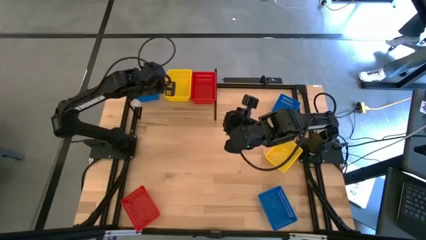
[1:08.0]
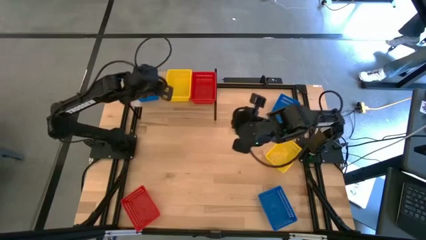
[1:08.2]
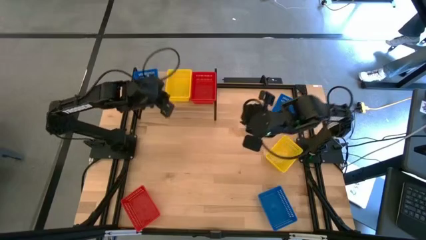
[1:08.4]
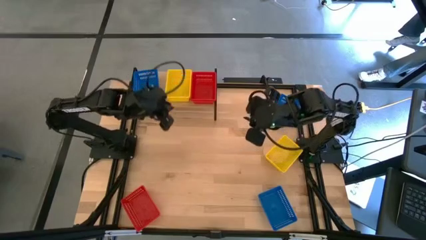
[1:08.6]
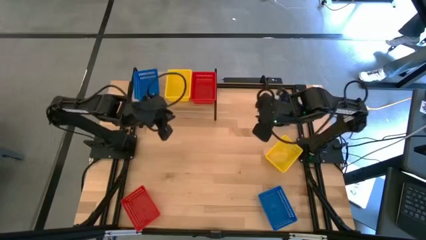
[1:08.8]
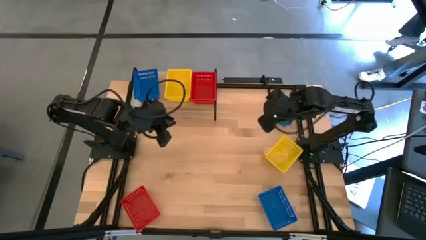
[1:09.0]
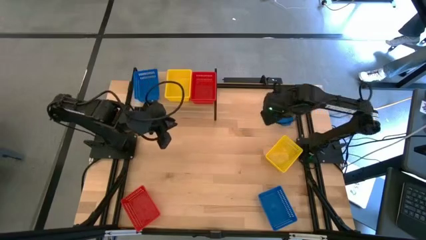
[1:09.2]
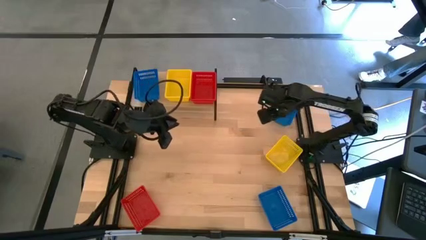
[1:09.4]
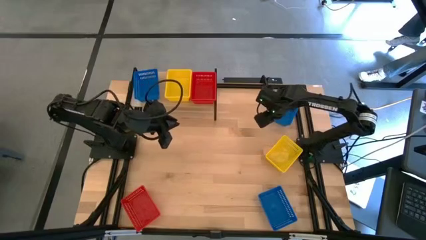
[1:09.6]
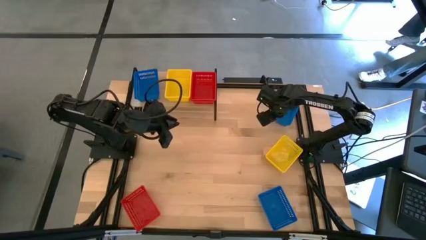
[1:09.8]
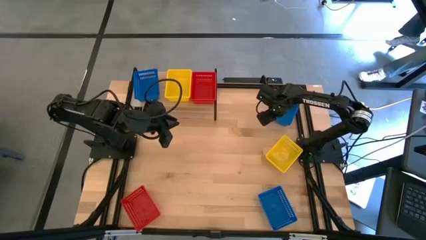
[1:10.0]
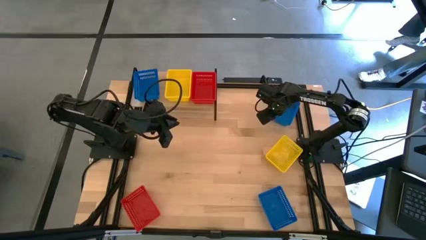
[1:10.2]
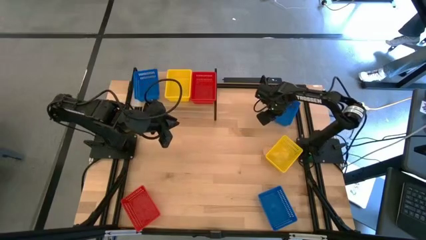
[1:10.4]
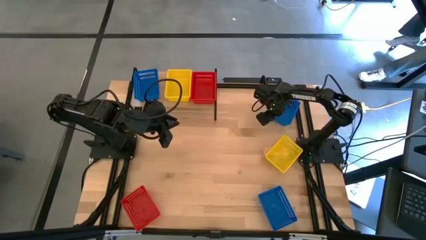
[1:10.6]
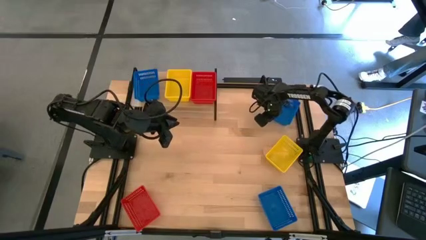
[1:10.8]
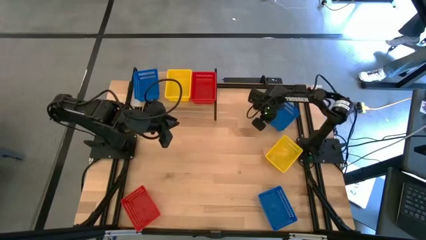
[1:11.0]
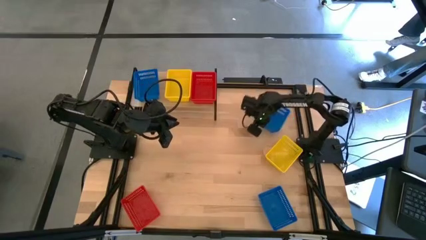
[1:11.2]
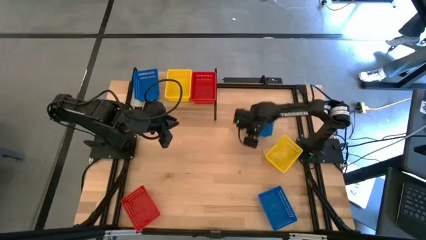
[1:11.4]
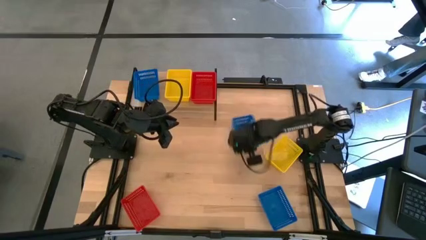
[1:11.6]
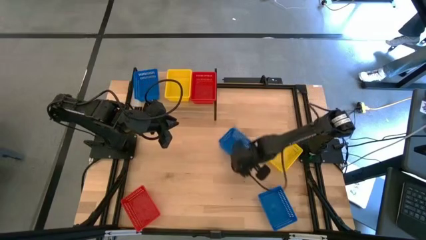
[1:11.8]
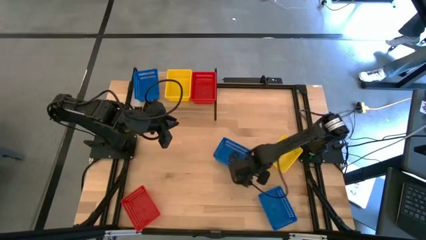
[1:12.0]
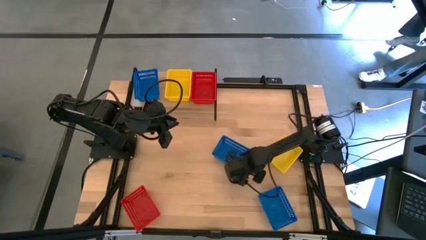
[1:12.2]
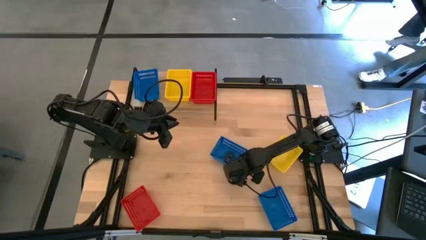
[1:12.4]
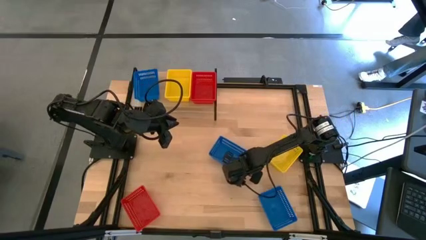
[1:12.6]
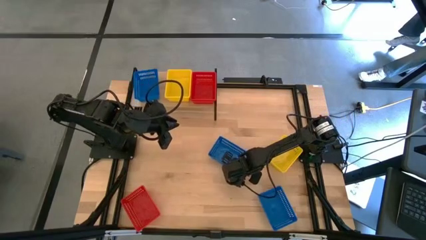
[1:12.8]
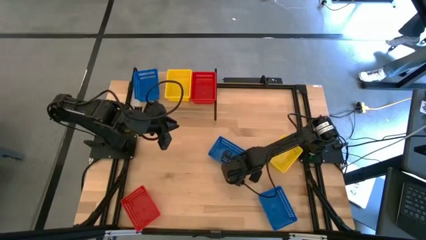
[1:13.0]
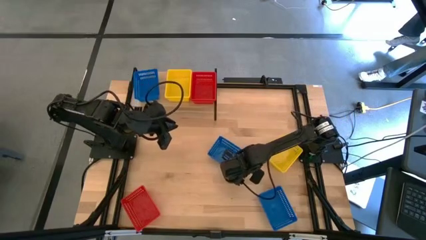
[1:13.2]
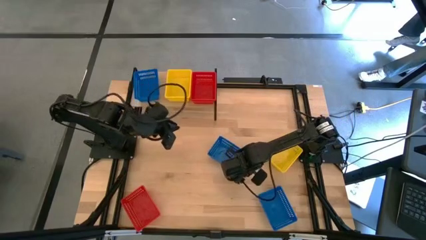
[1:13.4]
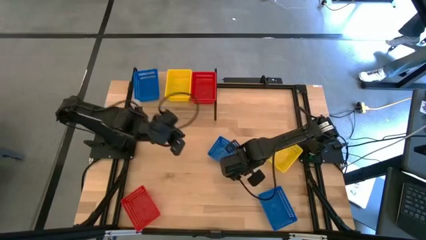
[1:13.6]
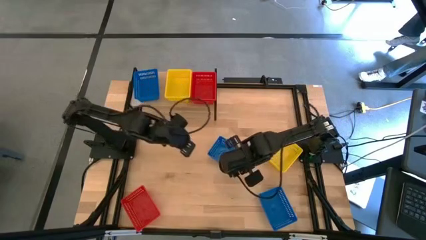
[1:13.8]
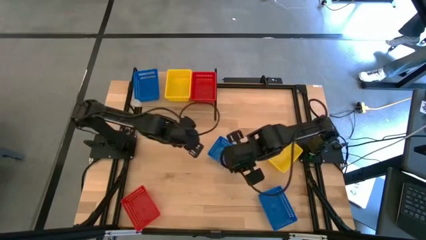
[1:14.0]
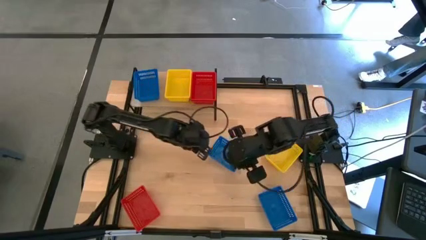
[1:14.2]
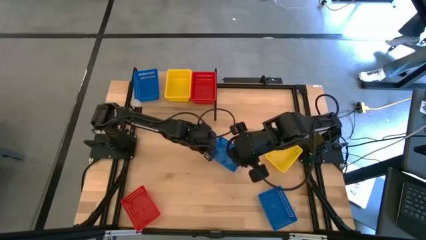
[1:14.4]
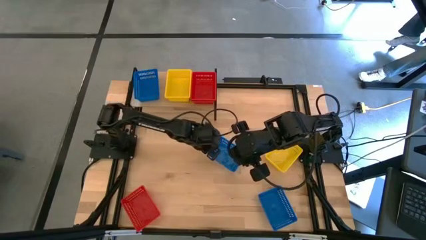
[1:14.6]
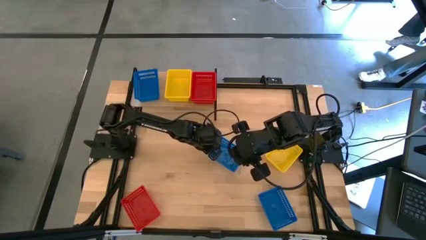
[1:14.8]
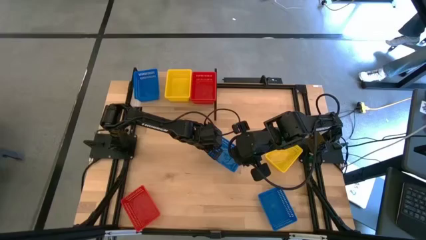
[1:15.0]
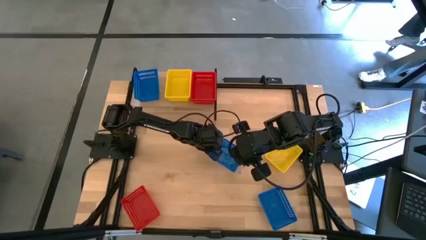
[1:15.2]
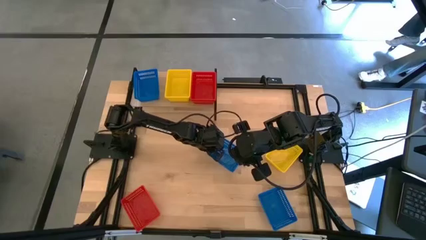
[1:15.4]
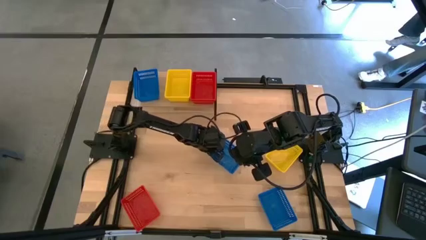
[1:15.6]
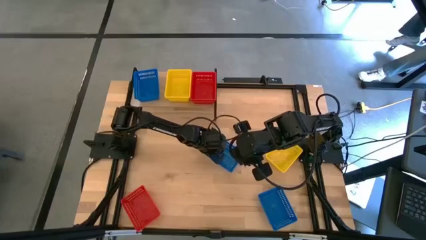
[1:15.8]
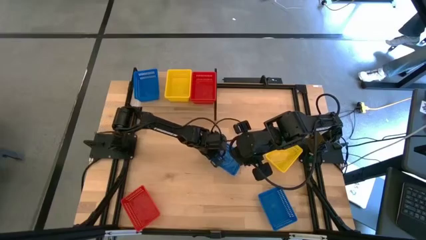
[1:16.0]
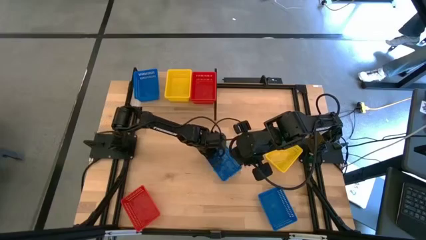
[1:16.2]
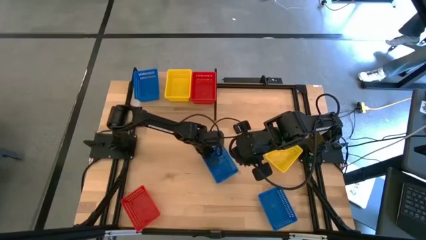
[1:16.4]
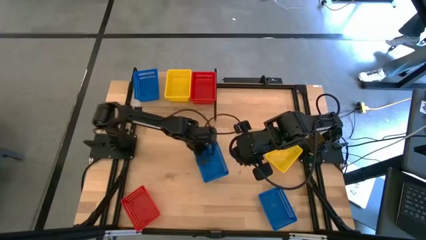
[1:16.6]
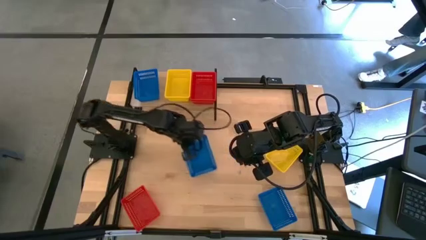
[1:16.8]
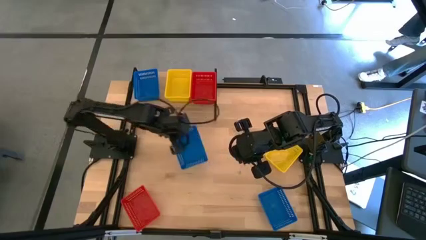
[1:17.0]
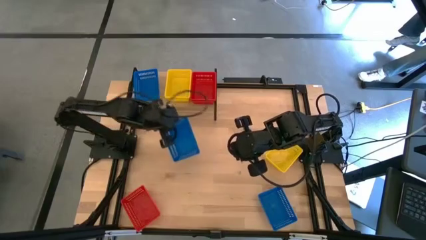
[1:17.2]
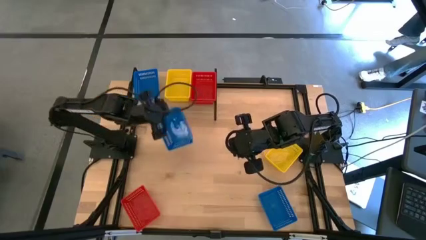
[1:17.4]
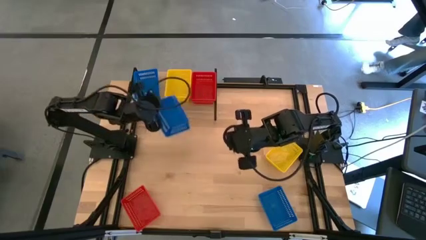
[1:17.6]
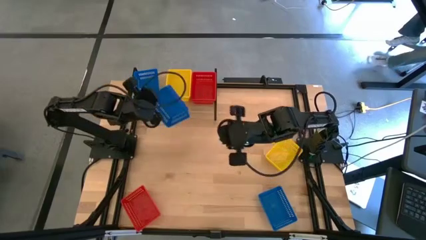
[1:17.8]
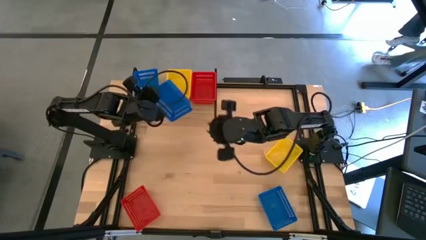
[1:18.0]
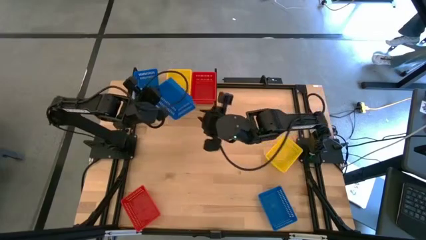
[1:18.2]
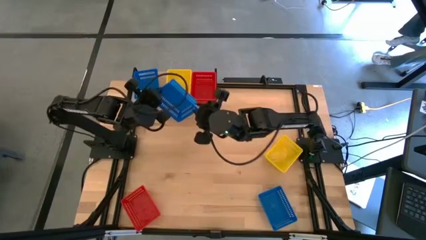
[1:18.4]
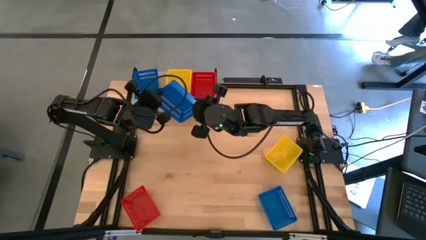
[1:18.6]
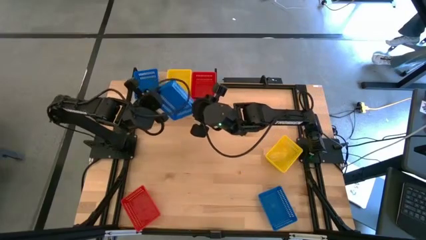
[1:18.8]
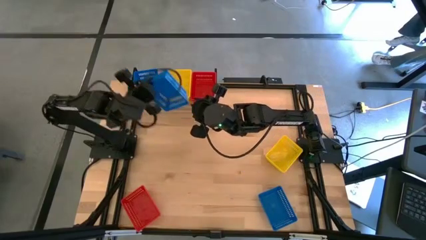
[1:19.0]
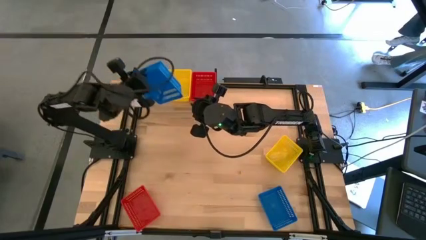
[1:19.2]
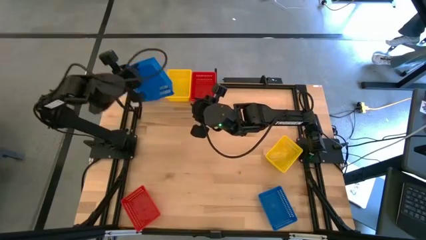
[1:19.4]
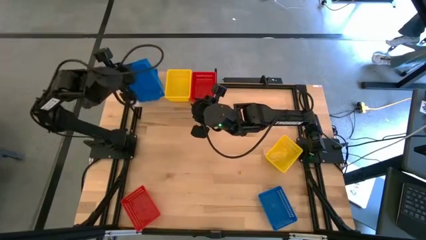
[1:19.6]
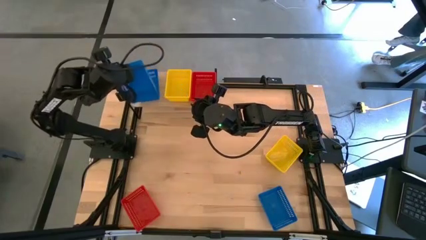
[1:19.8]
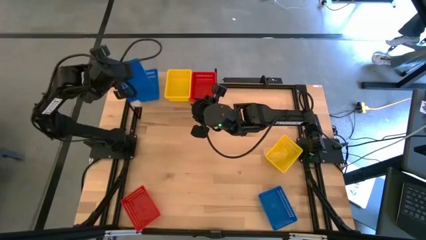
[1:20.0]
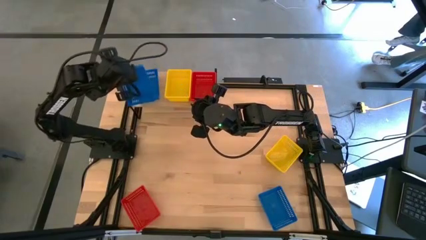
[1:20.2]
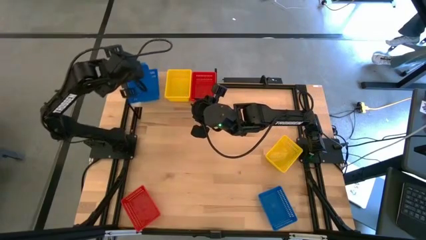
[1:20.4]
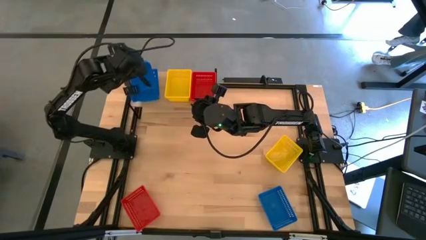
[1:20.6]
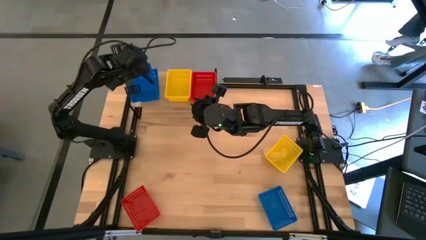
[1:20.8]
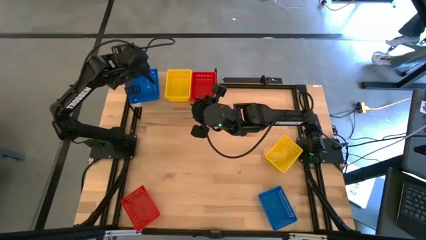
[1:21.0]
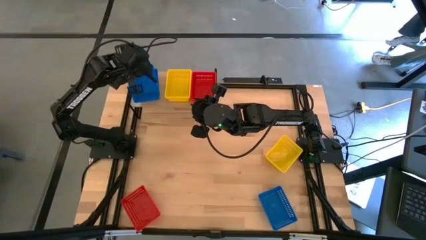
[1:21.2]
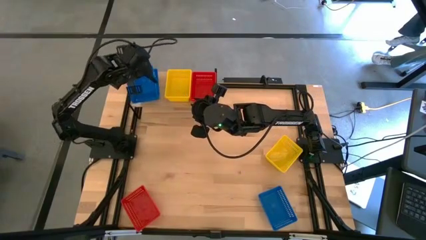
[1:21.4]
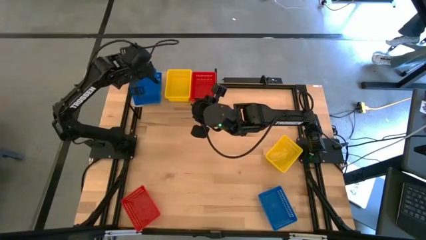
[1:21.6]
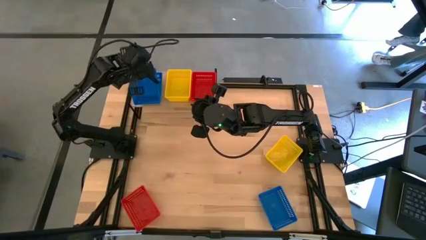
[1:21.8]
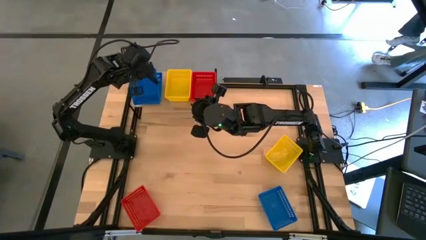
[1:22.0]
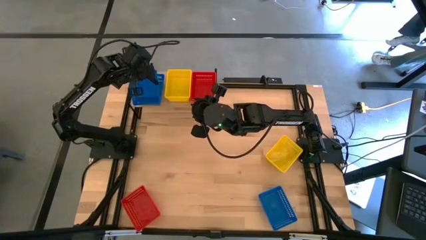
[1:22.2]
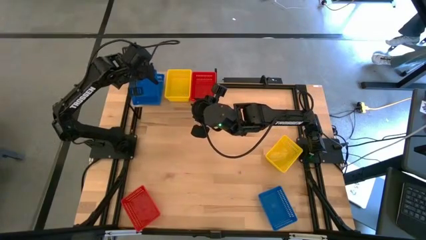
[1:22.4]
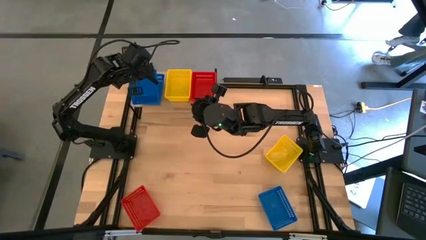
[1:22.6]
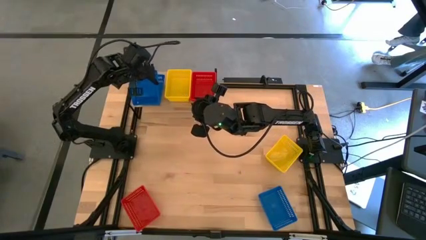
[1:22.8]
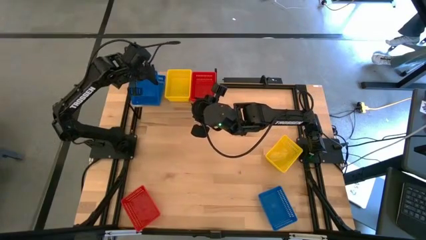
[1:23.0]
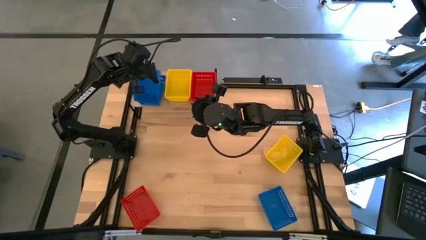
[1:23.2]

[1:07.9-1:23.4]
Task: Stack baskets on shelf by color
Stack the top blue bin on top of the blue bin on the shelf
